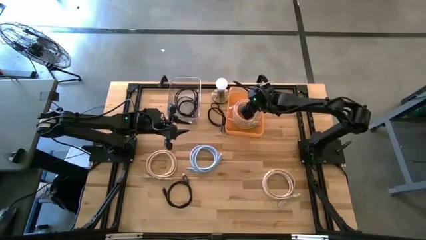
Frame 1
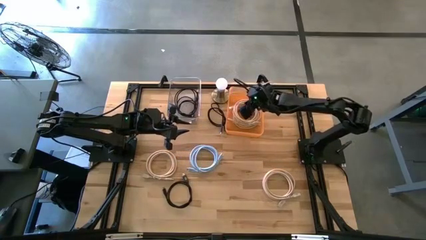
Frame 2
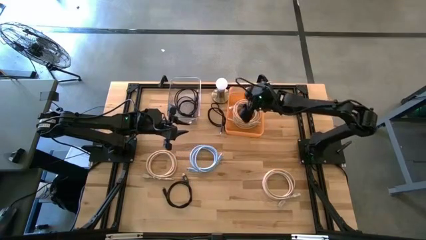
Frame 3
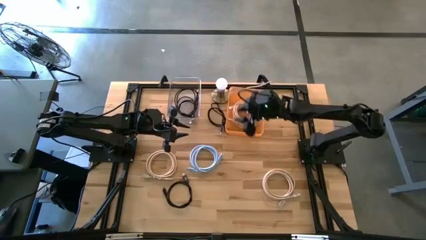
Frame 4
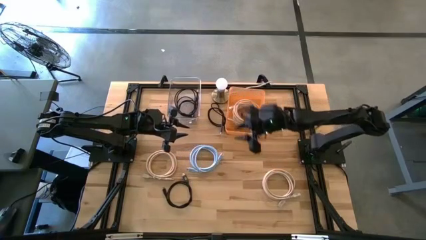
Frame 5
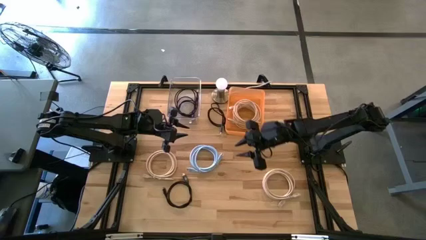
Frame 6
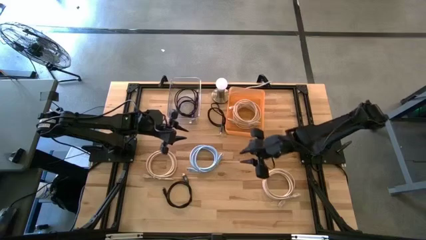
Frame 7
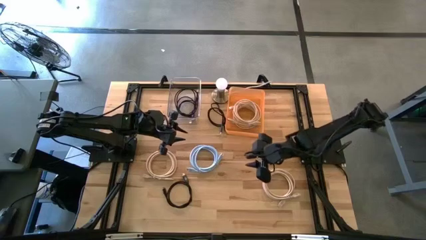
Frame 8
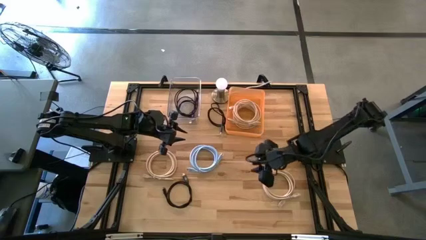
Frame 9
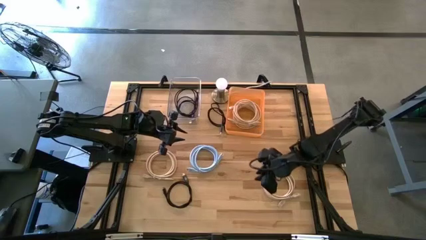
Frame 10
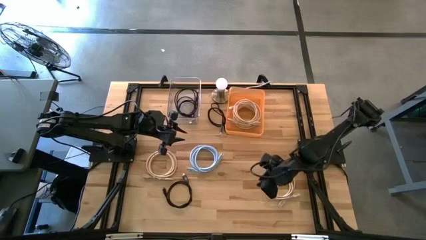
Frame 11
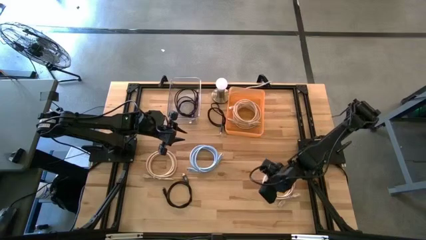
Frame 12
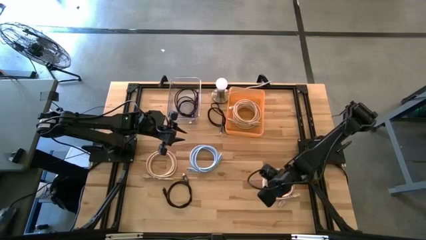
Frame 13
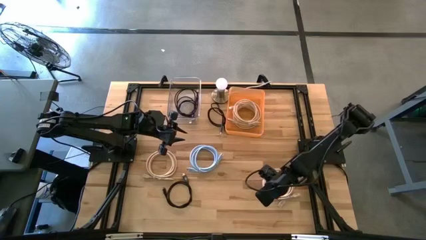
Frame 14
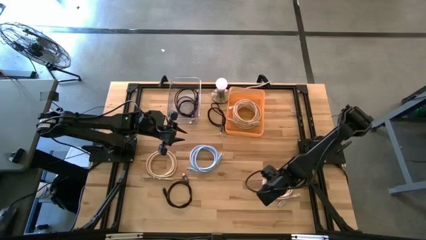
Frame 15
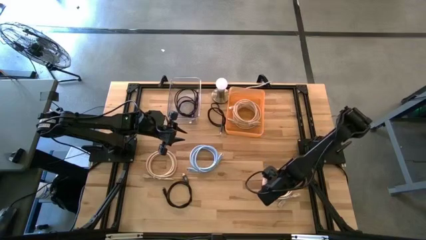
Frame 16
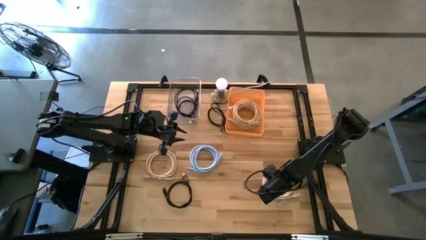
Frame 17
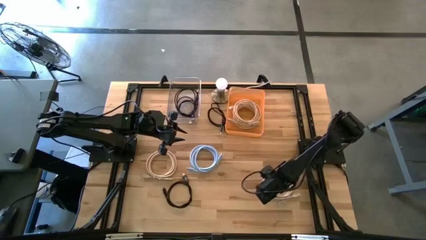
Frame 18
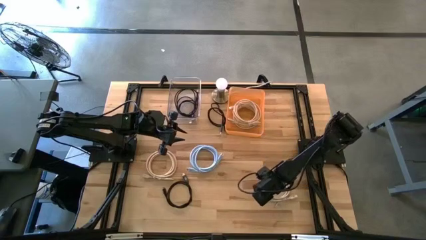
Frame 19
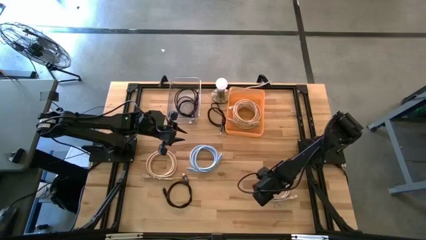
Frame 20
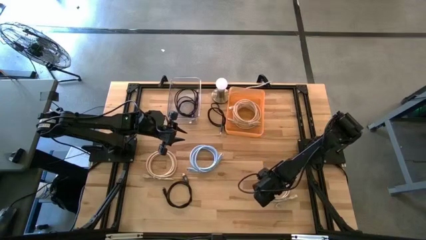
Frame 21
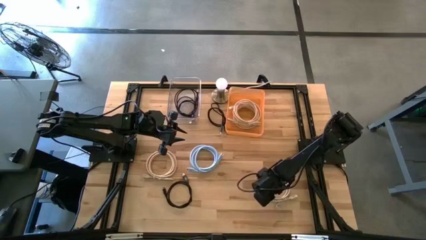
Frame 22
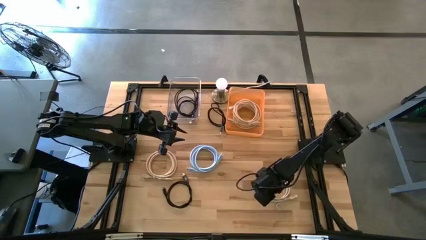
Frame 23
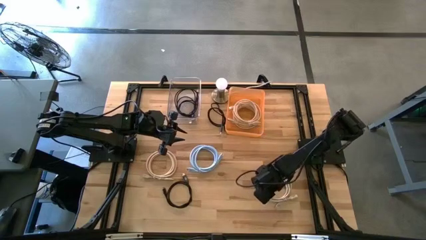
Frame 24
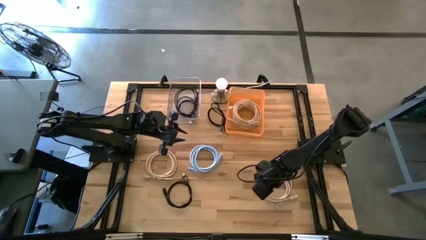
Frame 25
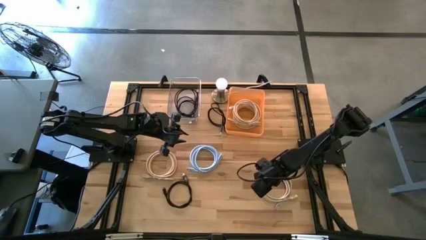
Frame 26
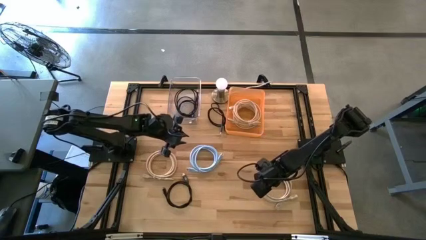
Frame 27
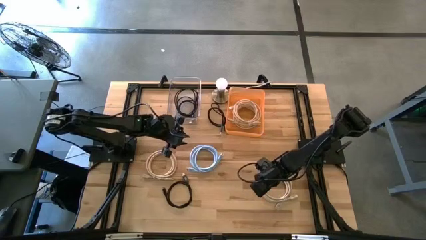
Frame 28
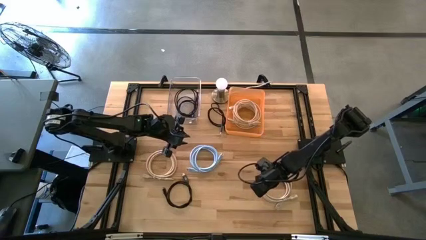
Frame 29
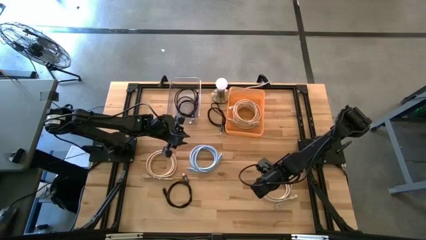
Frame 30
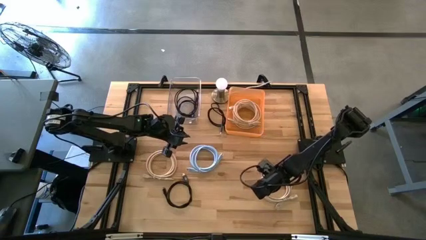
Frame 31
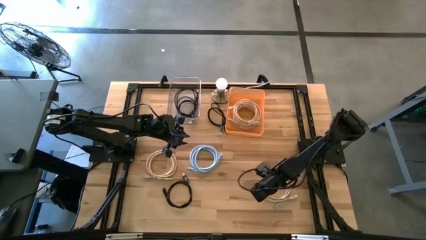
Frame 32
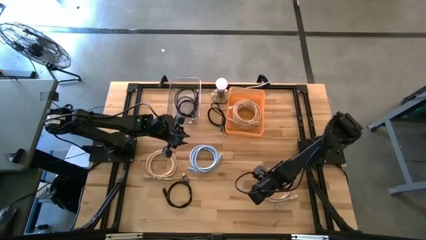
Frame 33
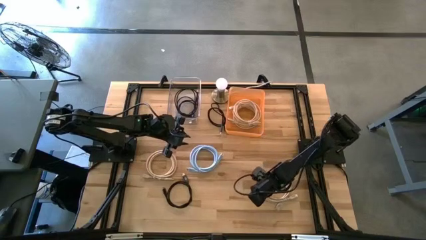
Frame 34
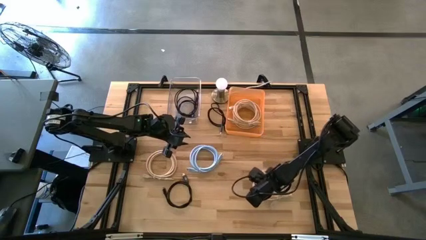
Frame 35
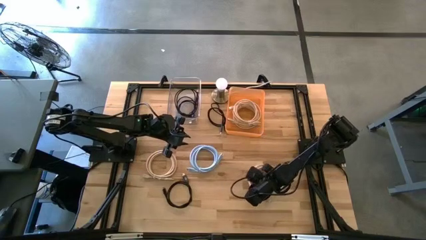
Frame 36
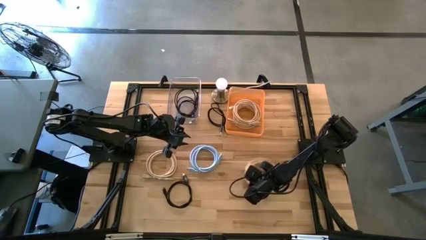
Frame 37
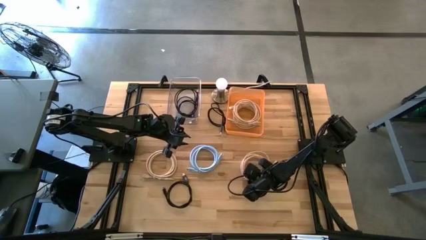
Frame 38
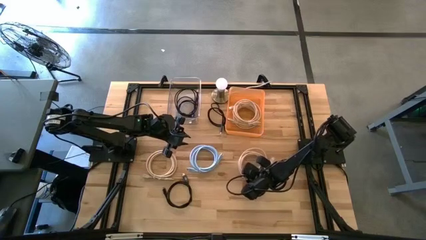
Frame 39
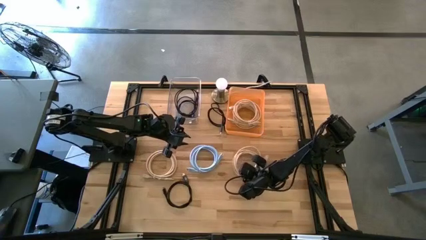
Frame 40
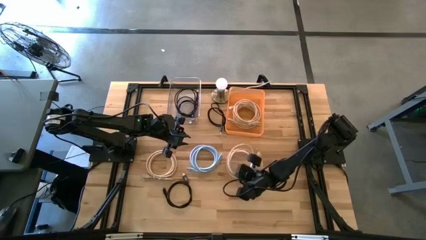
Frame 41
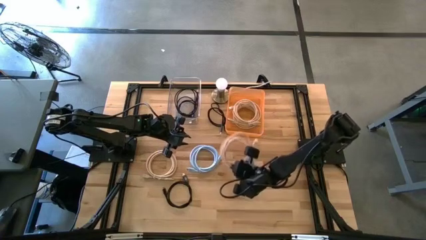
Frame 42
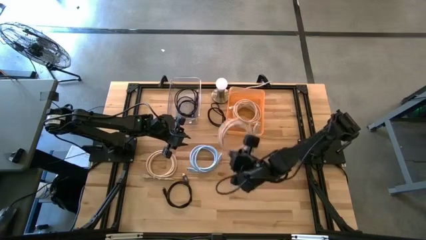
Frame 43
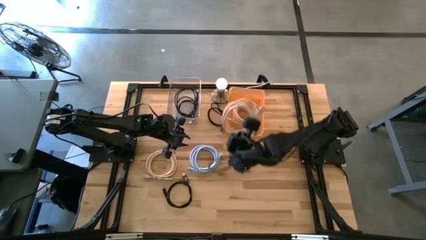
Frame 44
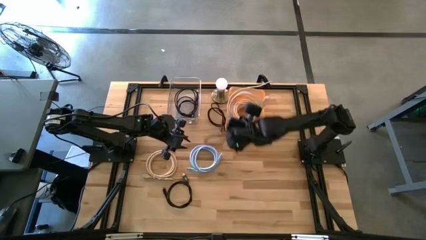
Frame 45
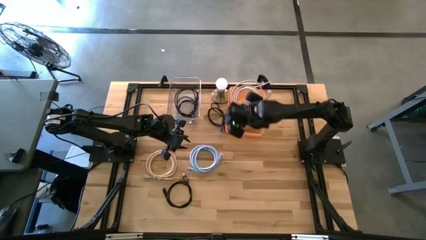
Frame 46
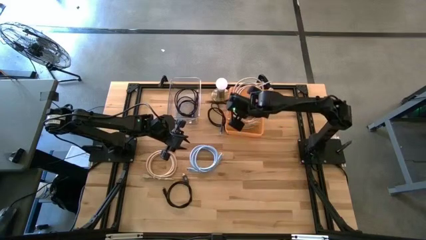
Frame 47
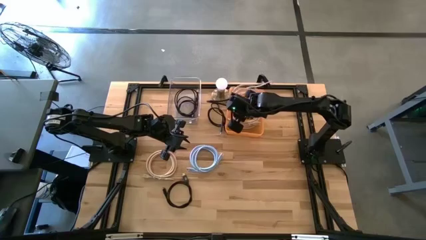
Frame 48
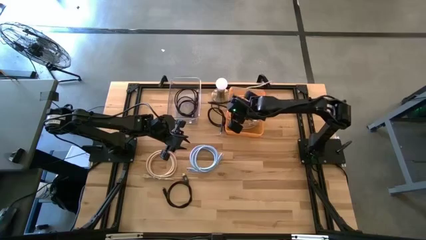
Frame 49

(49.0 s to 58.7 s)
Task: Pick & Place USB Port
Put the light brown charger cable into the orange bin

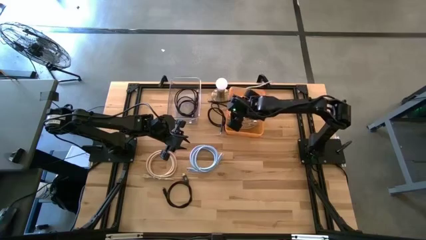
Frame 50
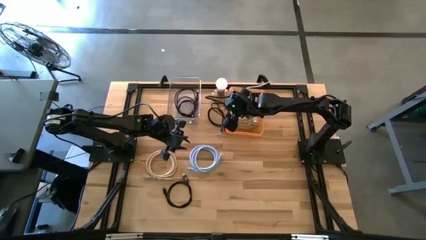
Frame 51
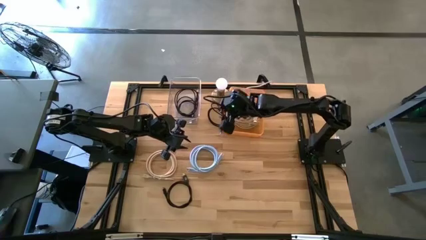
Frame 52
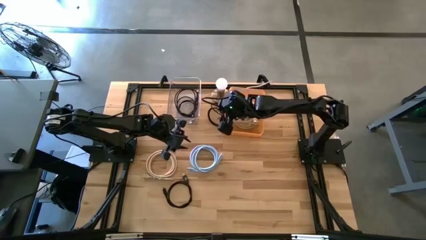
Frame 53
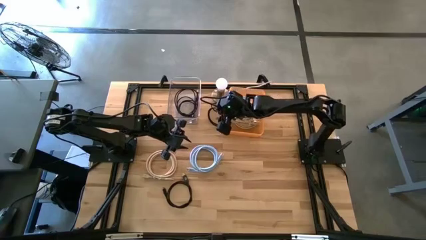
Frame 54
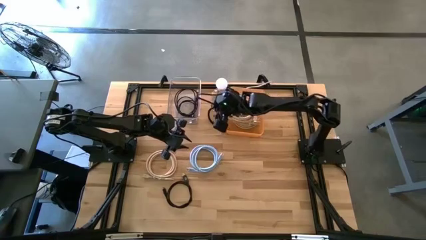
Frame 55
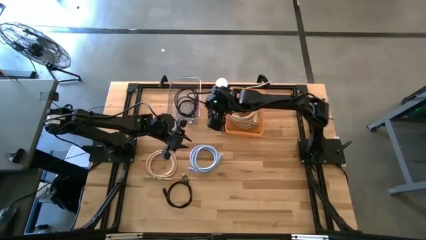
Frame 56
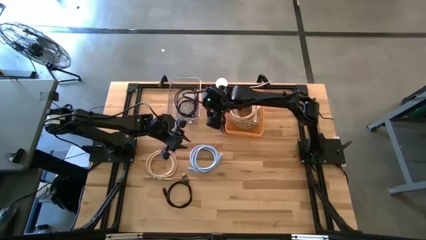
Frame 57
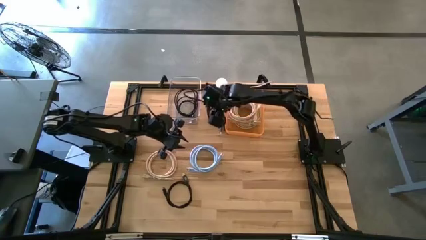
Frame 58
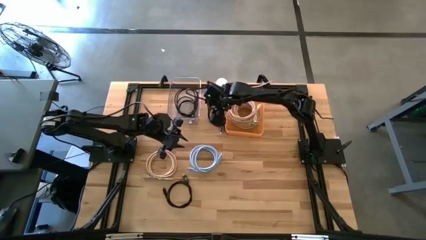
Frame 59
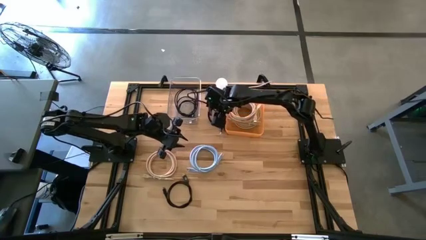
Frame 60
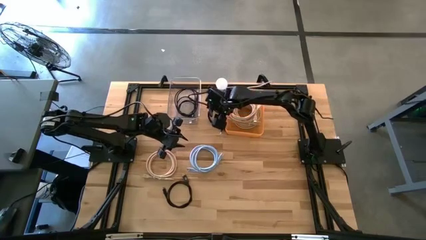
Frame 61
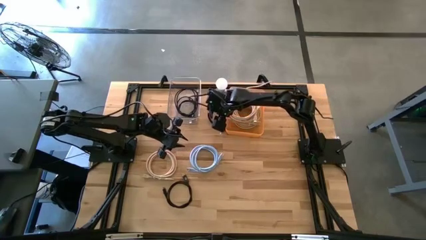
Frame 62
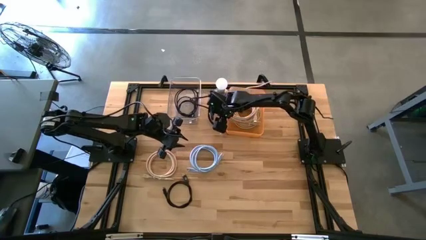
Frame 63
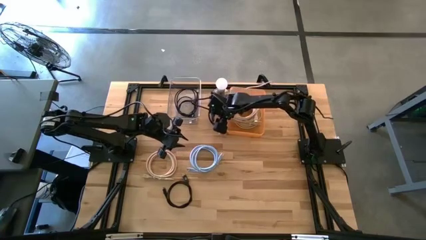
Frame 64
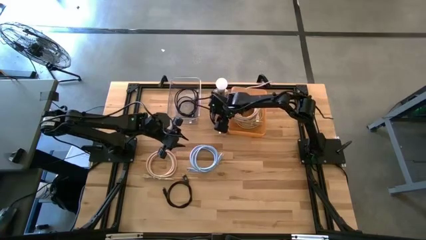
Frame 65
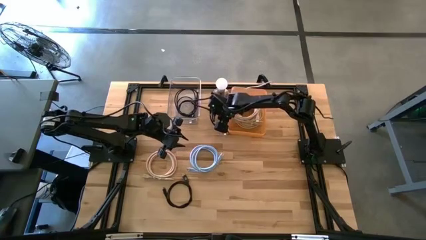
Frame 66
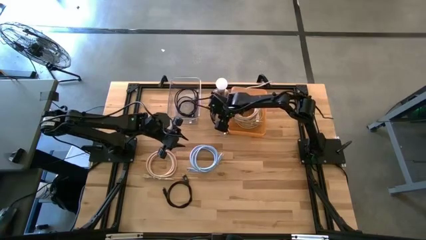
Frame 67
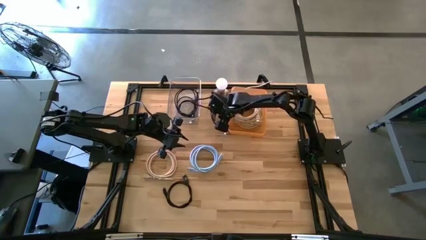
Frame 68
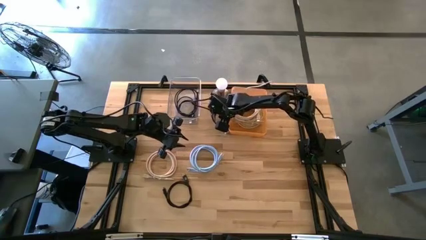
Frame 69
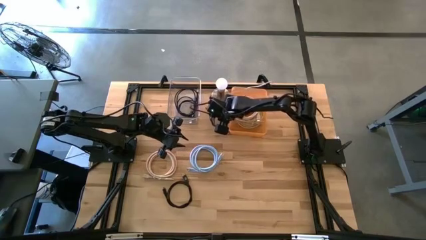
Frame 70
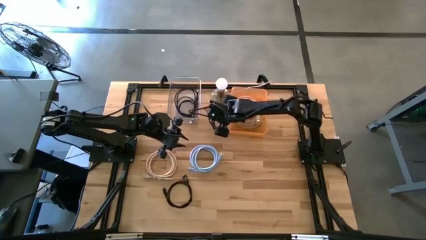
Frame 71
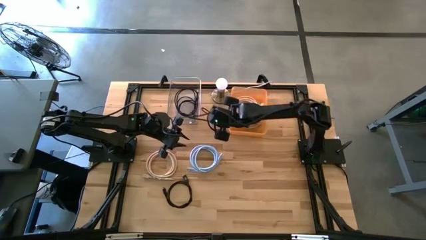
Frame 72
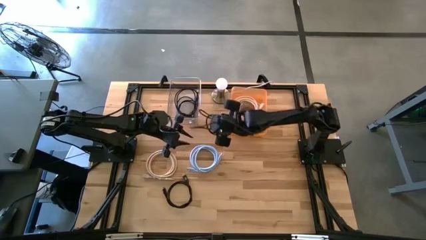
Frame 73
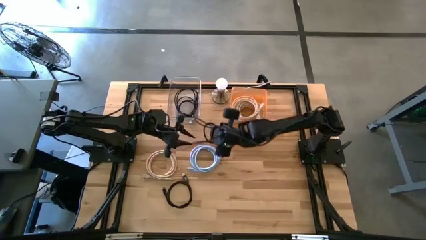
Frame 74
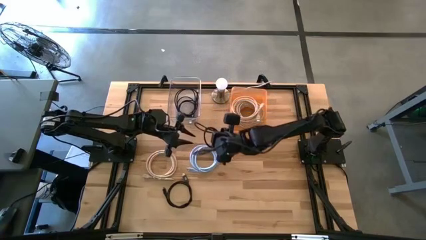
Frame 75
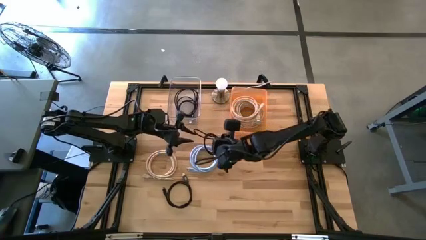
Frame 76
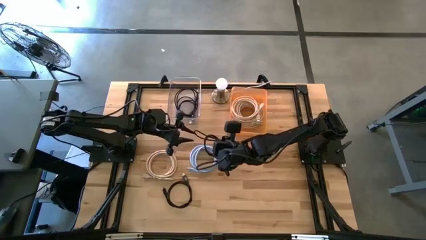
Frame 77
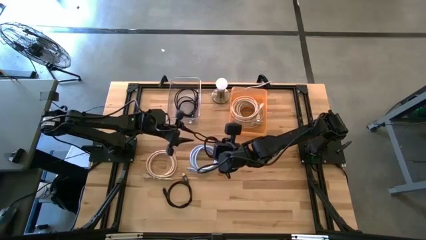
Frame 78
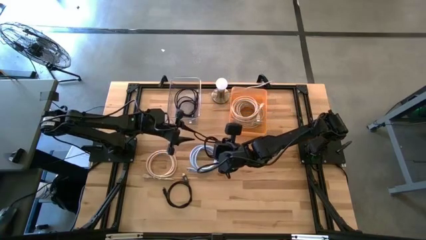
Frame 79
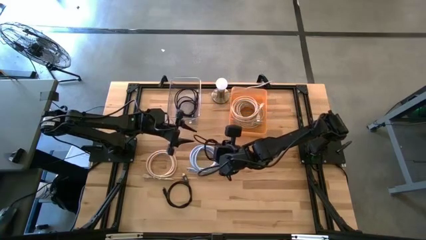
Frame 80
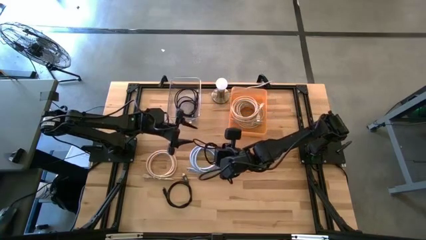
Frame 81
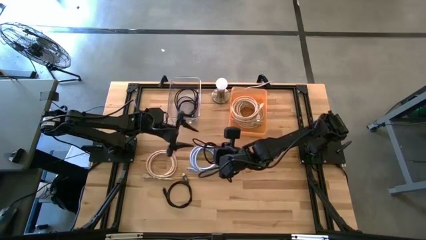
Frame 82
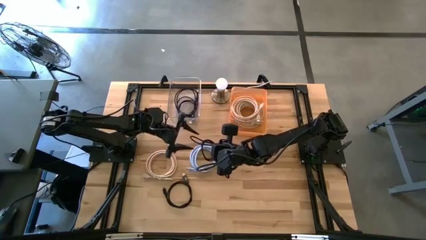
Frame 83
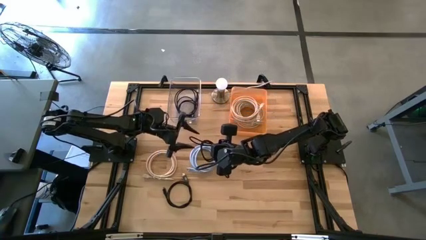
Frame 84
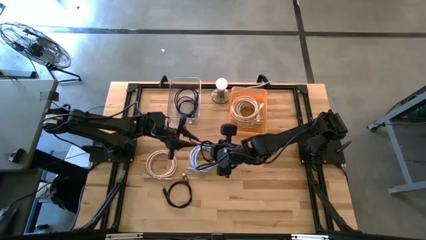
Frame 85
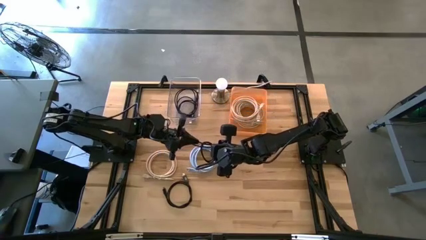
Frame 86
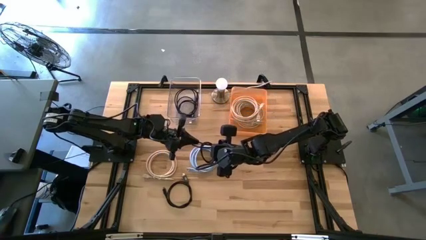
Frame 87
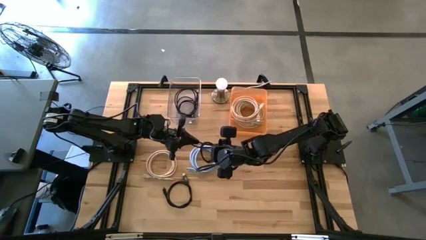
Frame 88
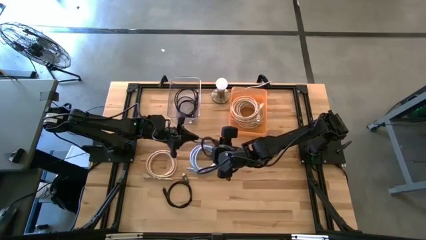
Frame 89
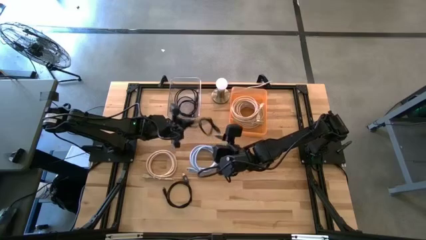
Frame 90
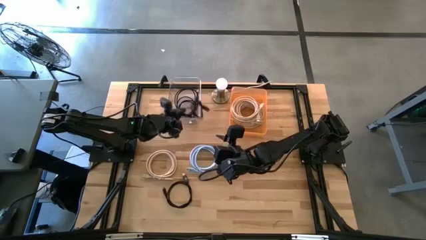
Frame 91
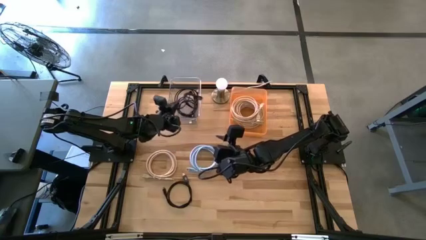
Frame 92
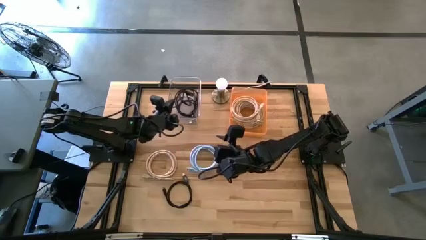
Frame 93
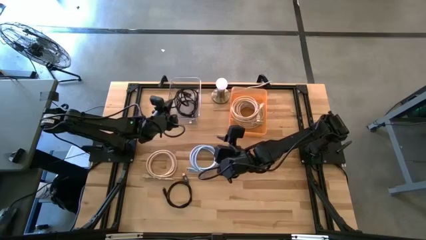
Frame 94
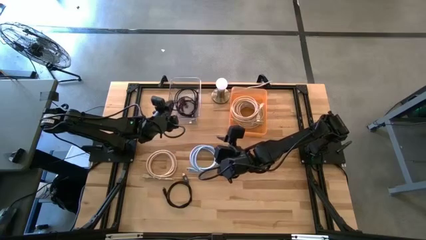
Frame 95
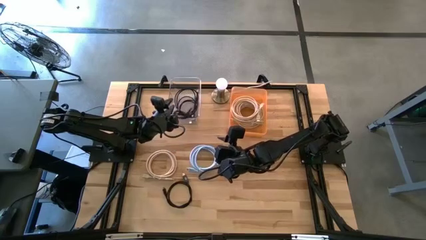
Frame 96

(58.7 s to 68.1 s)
Put the black charger cable into the transparent bin
